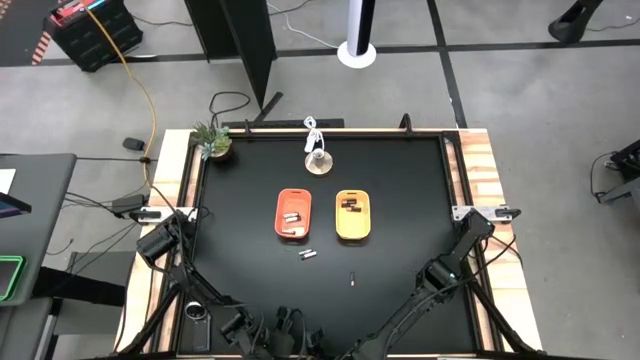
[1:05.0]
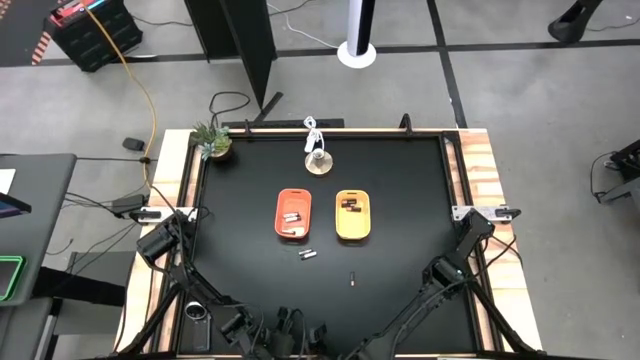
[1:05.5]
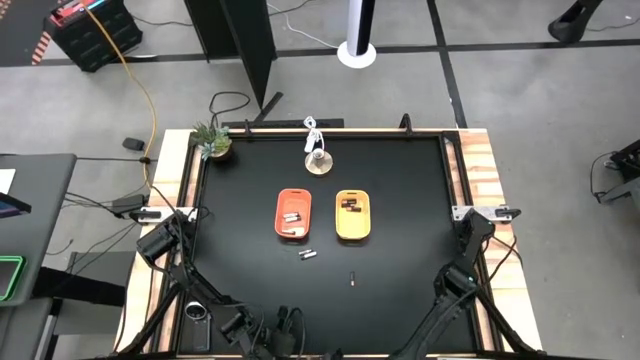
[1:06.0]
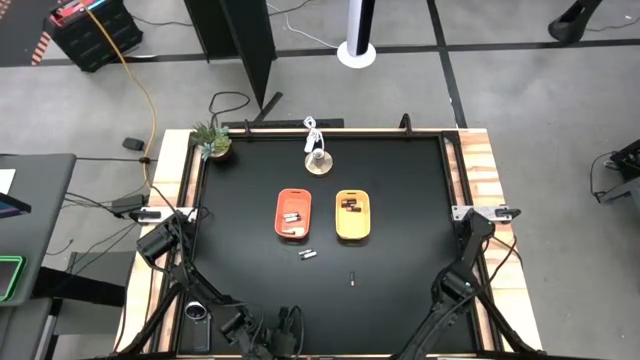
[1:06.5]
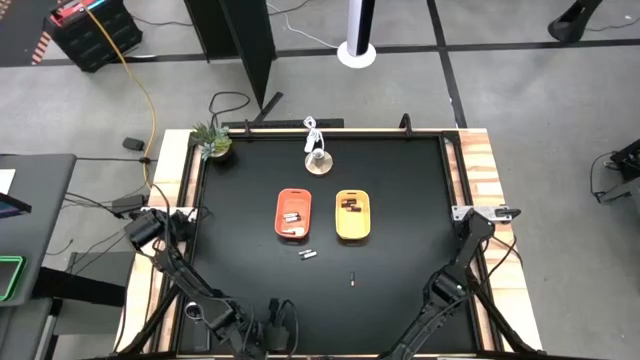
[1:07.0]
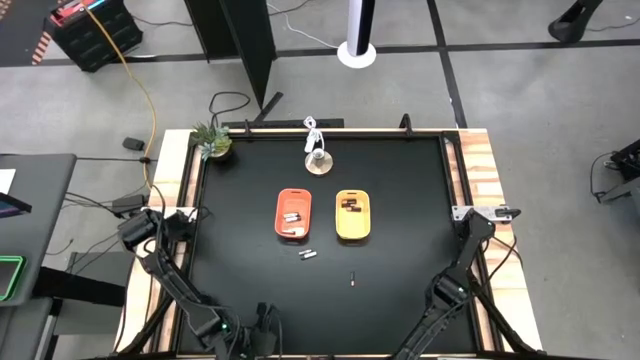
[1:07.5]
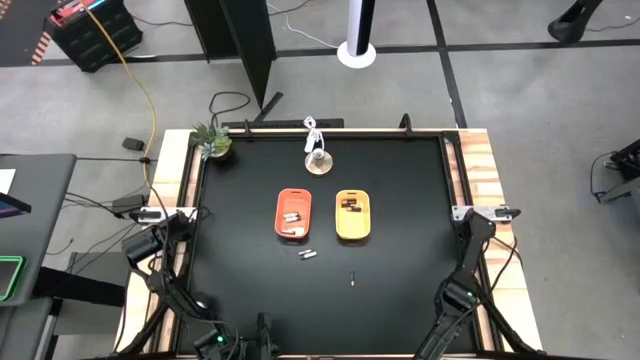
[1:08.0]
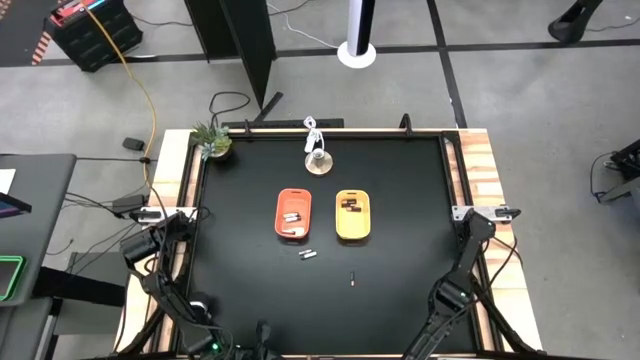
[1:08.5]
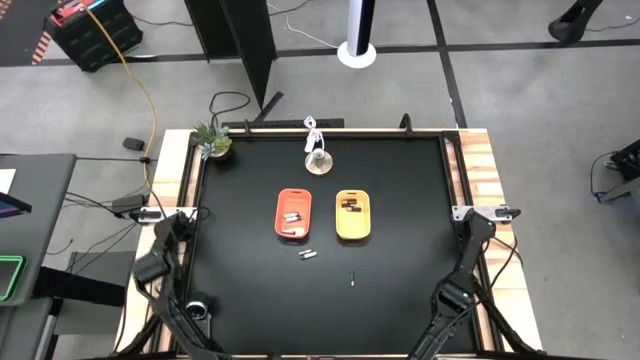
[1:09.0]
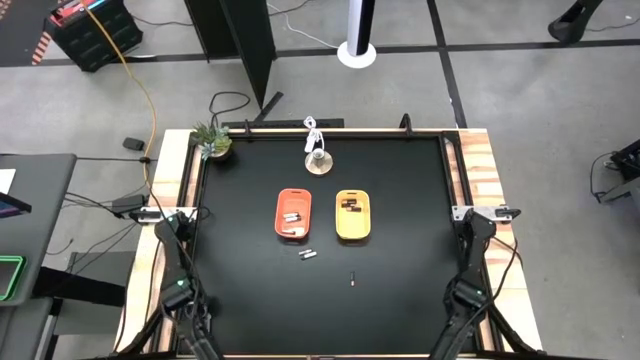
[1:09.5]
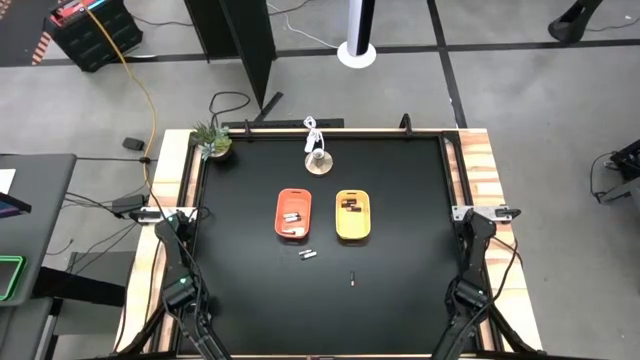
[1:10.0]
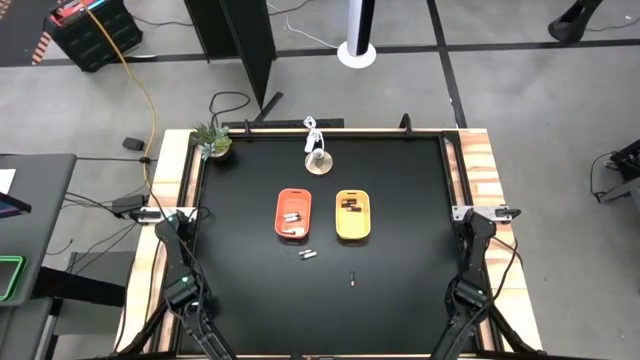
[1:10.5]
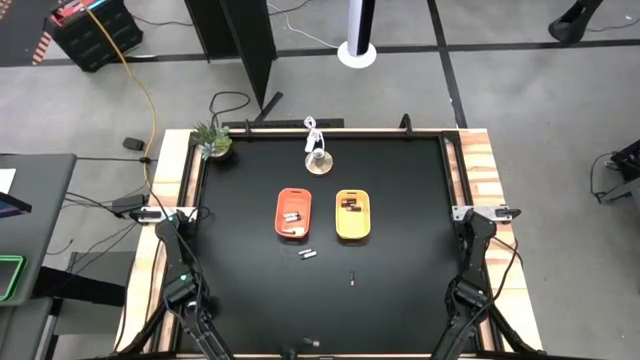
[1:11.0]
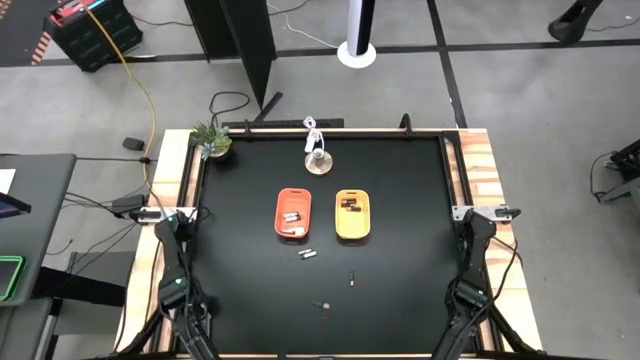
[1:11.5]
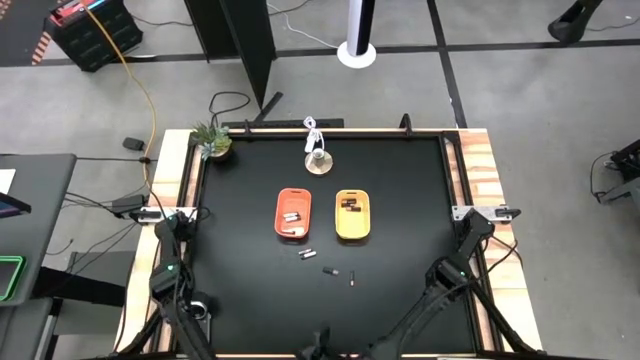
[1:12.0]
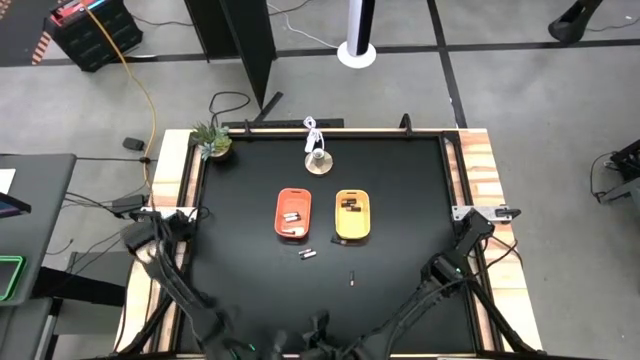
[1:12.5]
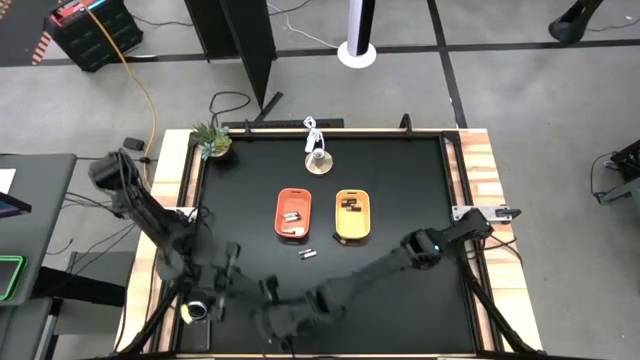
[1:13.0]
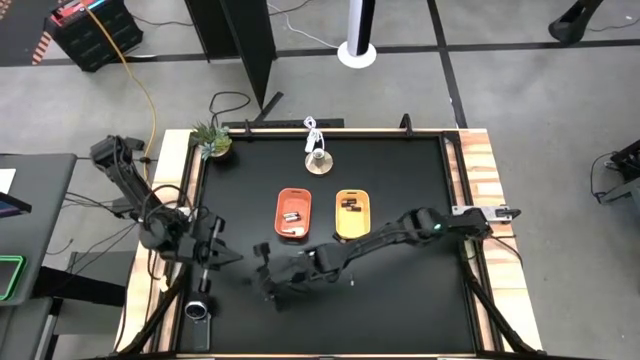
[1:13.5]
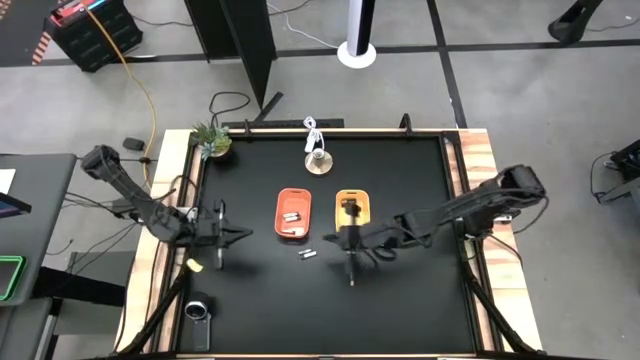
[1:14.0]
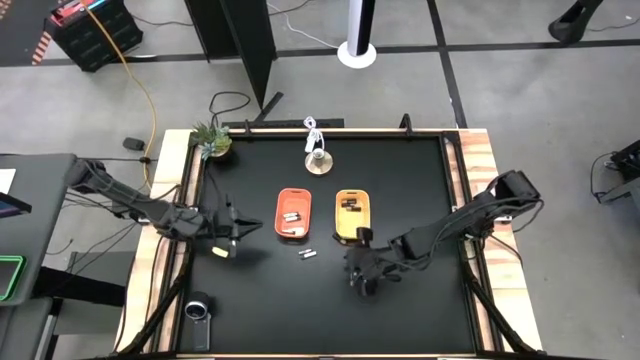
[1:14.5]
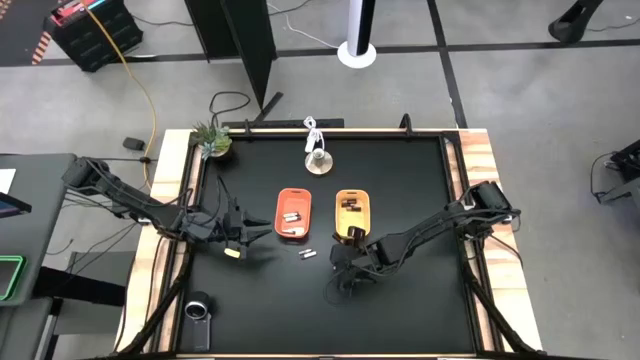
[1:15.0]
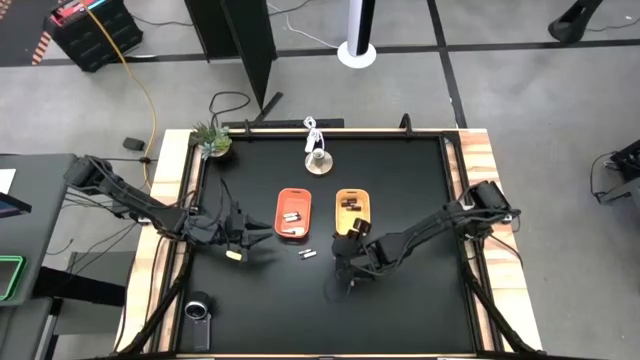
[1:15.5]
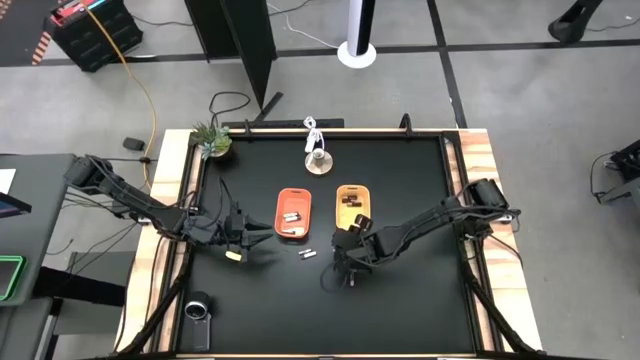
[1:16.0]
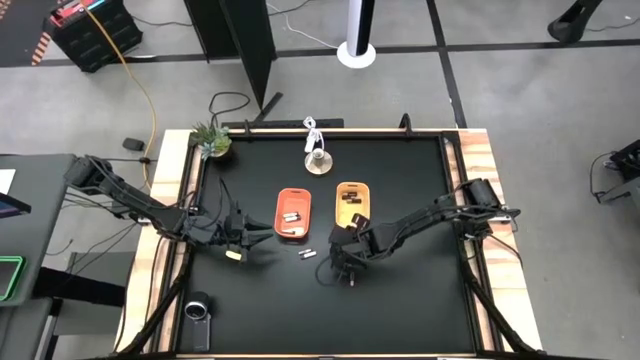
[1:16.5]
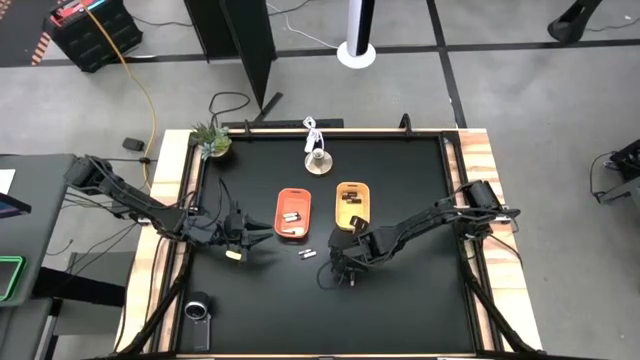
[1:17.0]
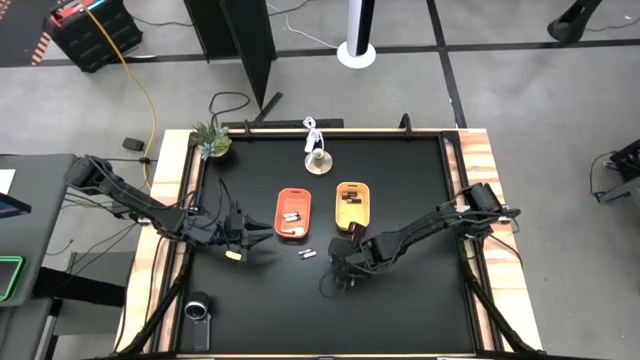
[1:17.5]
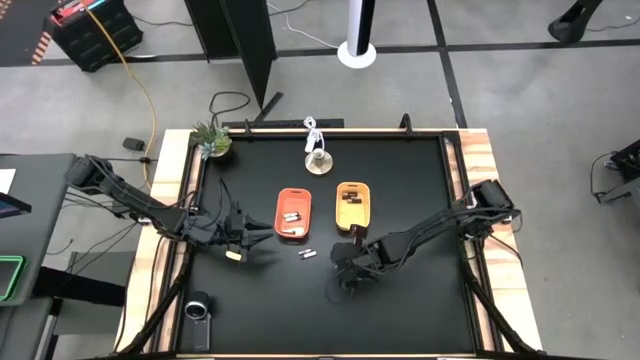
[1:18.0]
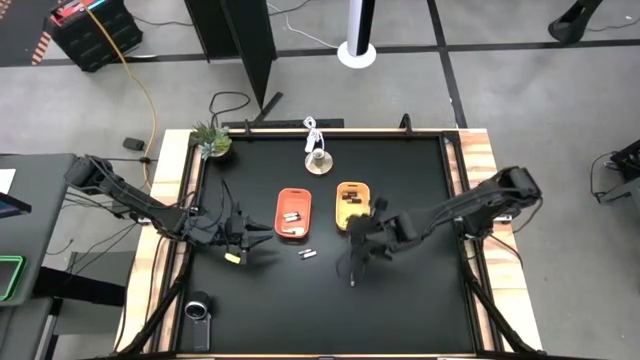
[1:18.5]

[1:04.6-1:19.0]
Task: Sort batteries
Put the black battery into the yellow bin

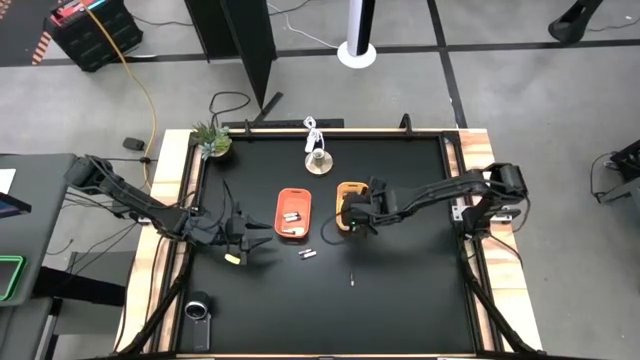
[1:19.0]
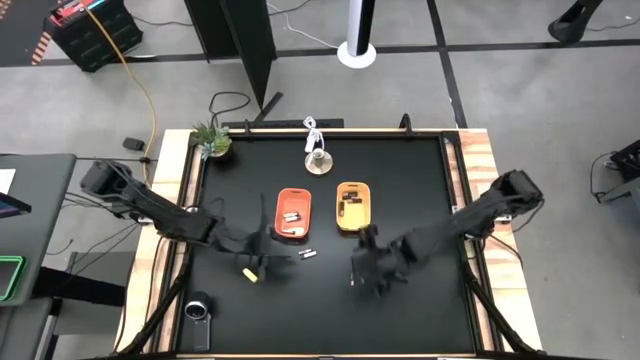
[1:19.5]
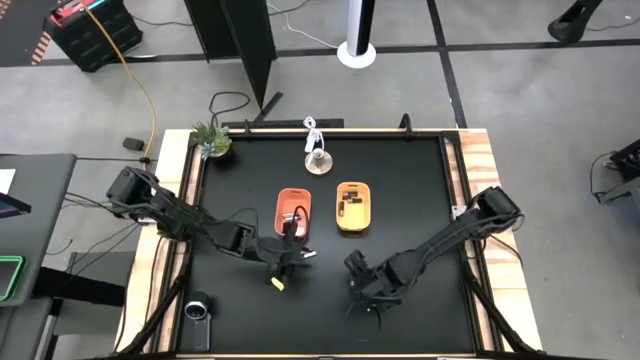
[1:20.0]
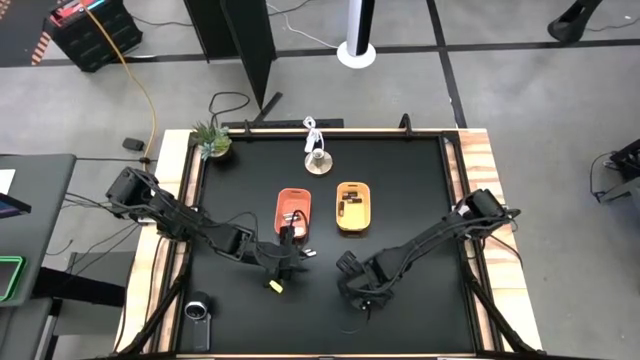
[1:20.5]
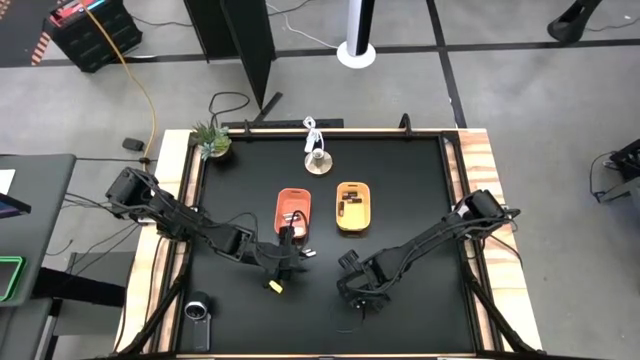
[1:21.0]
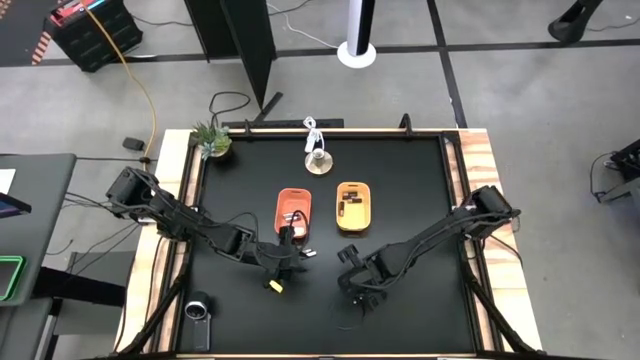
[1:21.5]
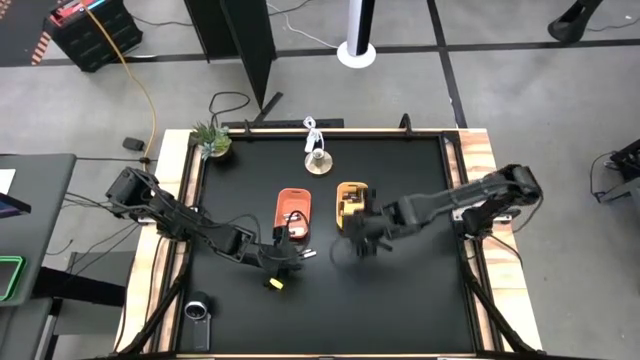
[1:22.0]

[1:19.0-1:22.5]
Put the silver battery into the orange bin

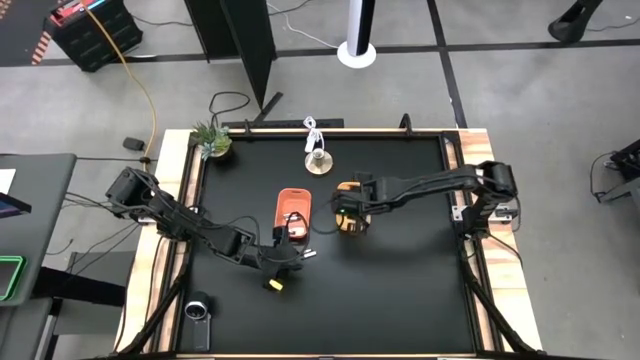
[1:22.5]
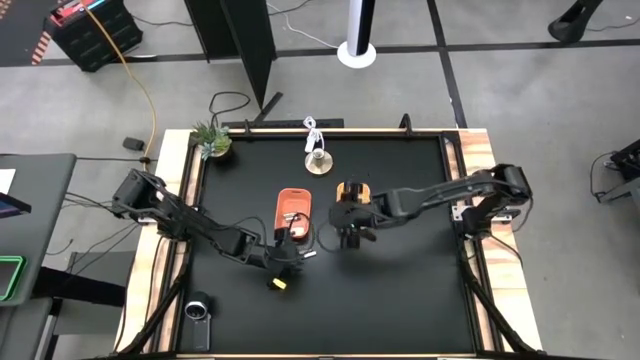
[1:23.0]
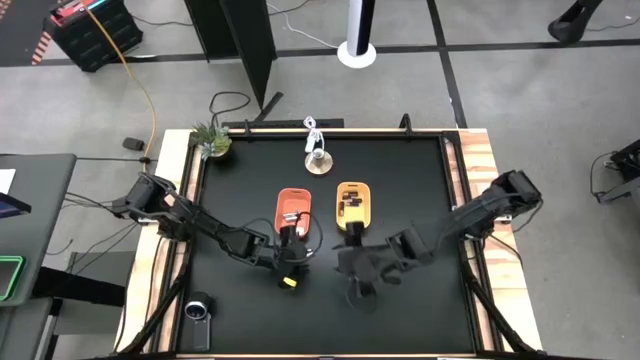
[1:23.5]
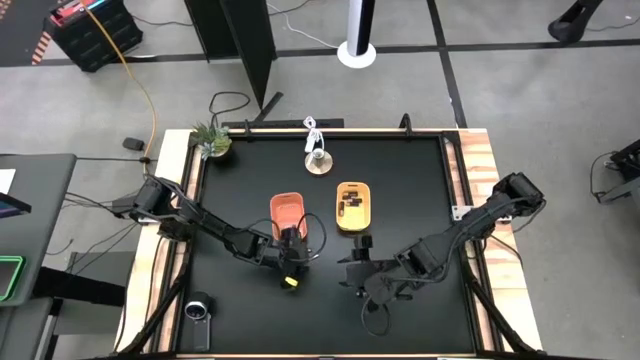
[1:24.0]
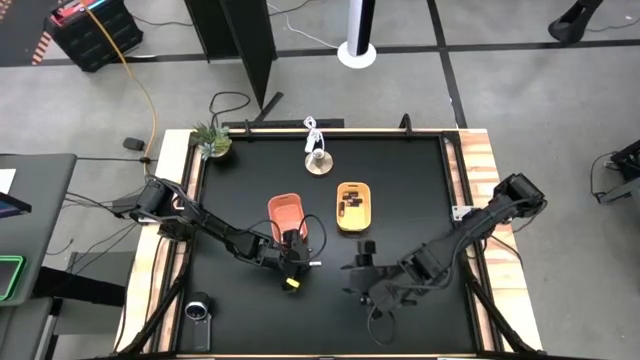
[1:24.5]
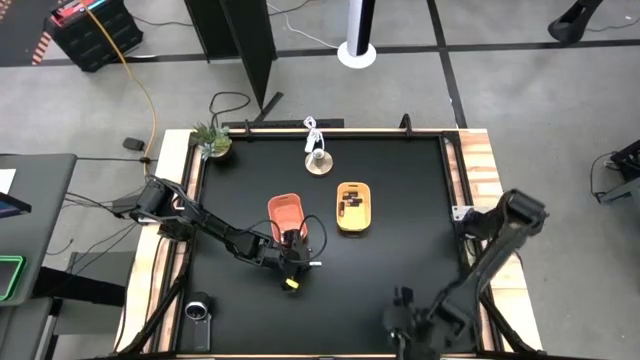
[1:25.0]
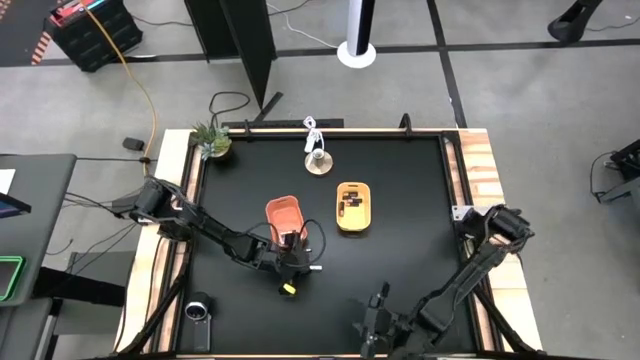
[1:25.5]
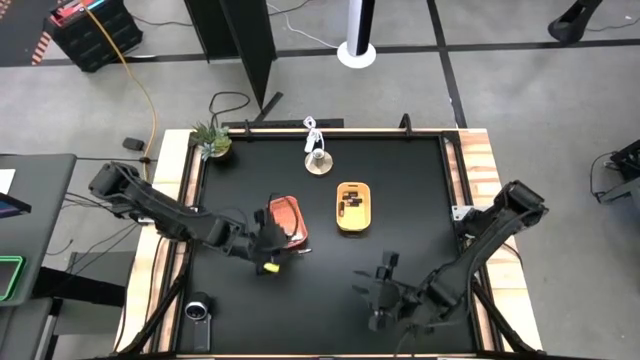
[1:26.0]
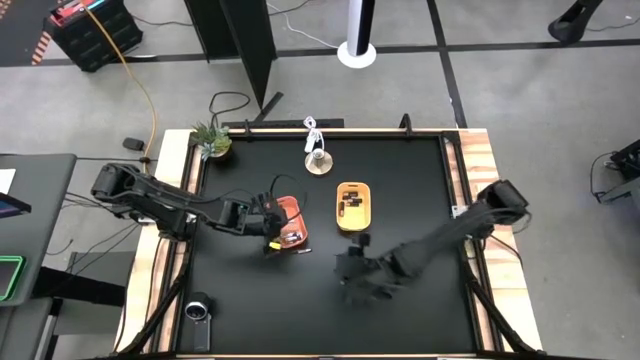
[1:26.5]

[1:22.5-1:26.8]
Put the silver battery into the orange bin

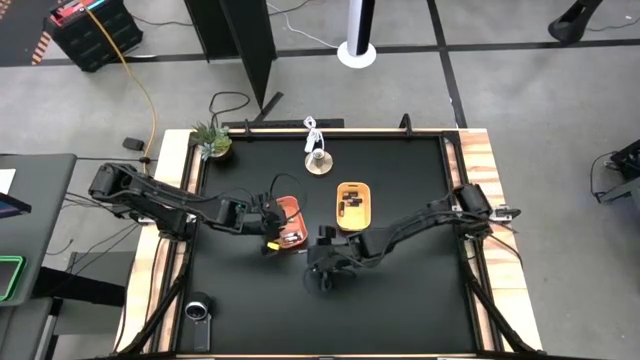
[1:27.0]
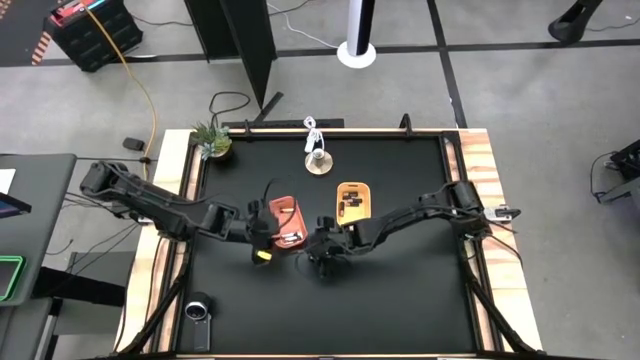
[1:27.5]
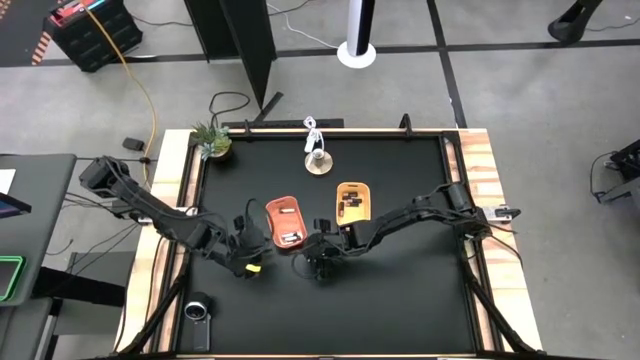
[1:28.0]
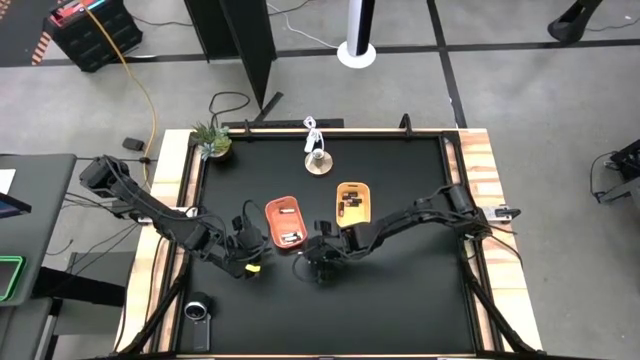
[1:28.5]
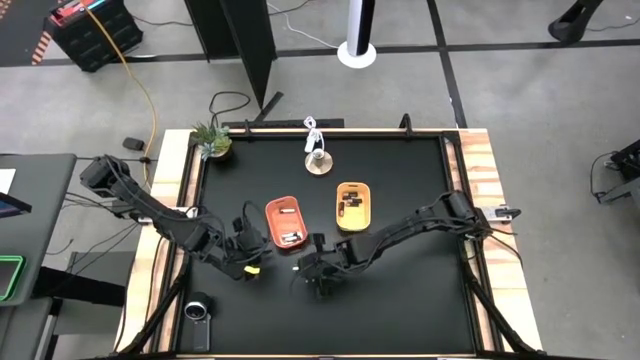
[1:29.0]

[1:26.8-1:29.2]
Put the silver battery into the orange bin
